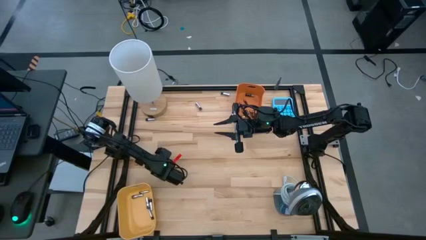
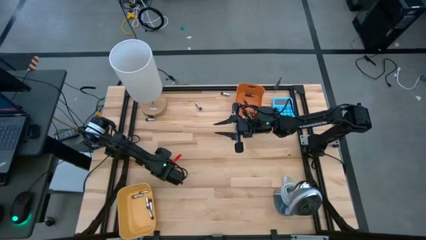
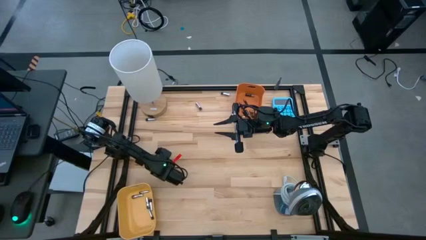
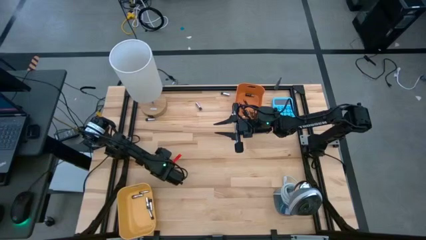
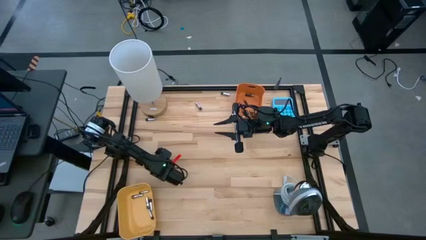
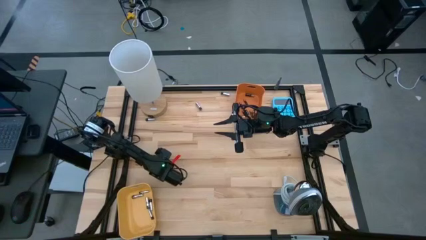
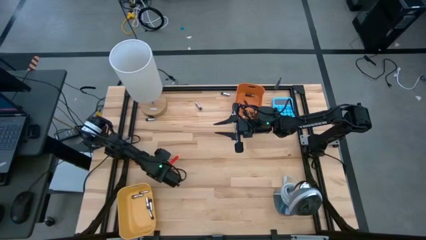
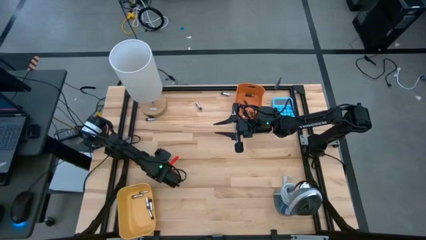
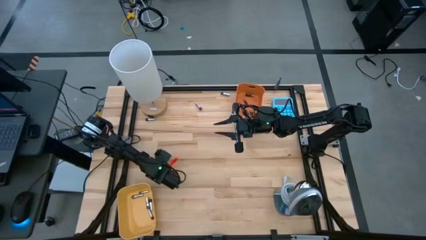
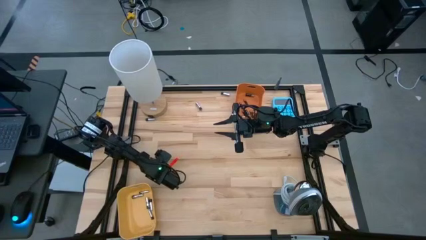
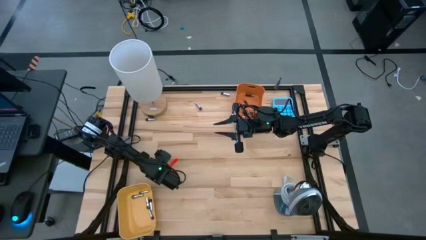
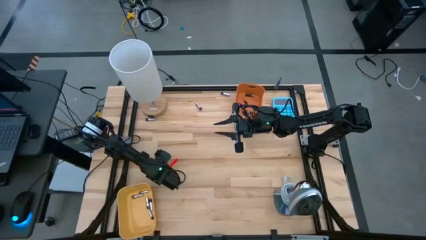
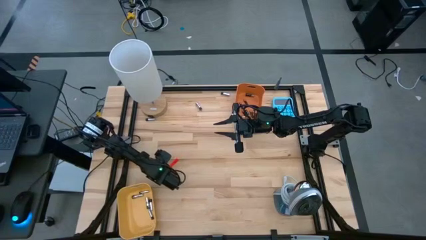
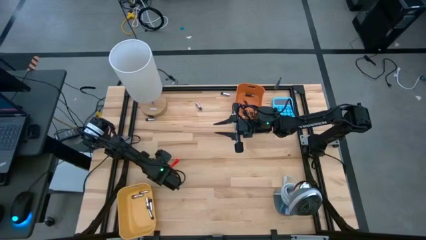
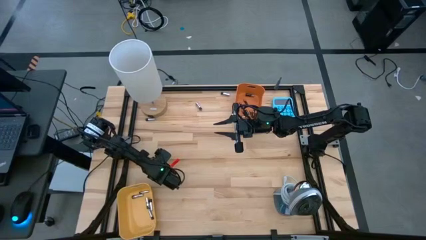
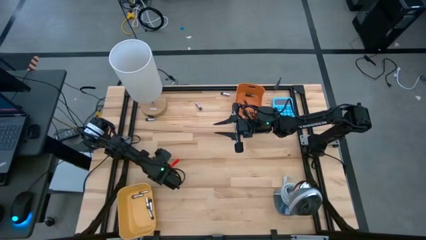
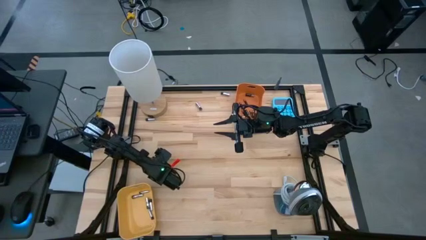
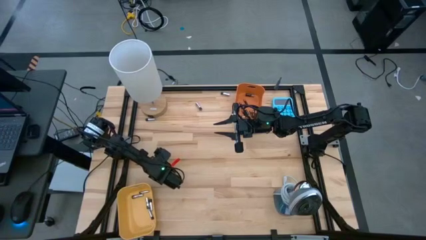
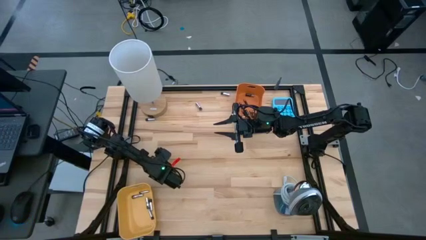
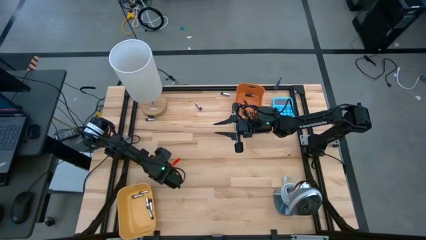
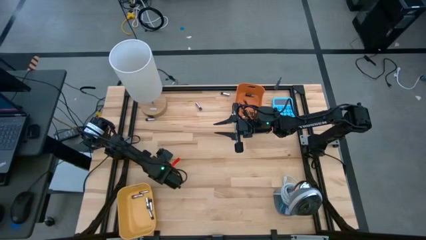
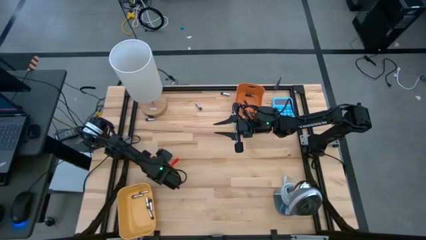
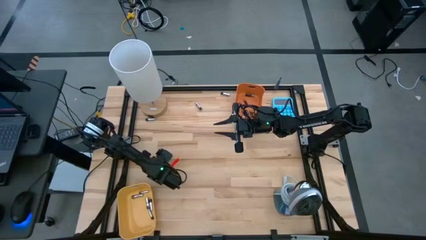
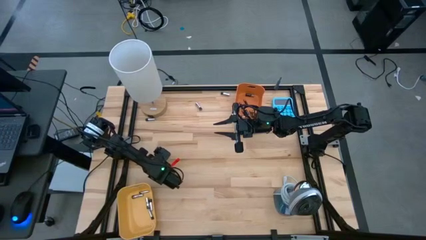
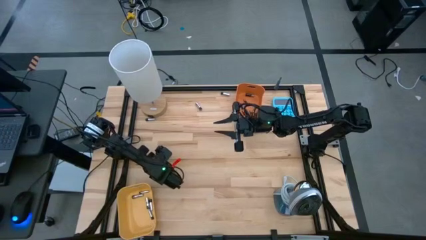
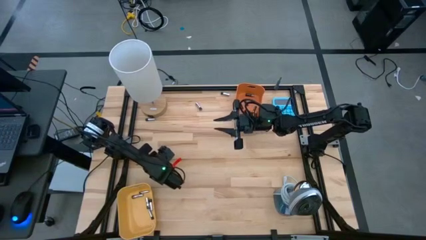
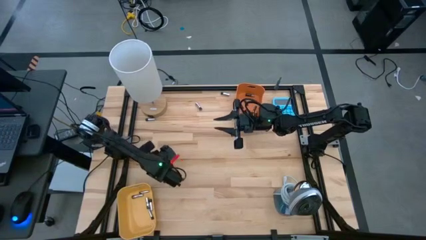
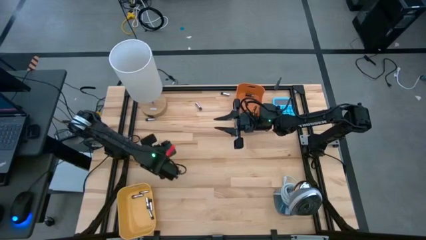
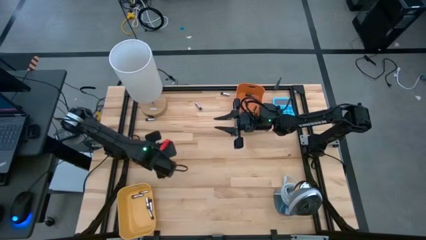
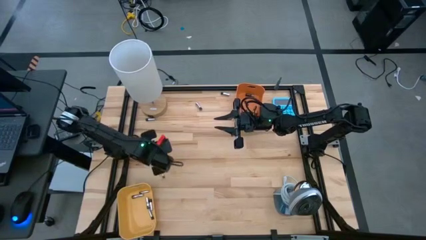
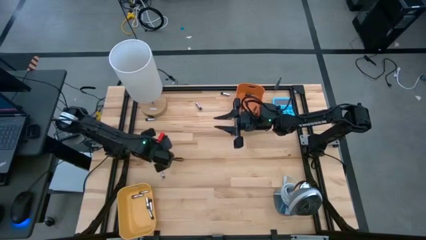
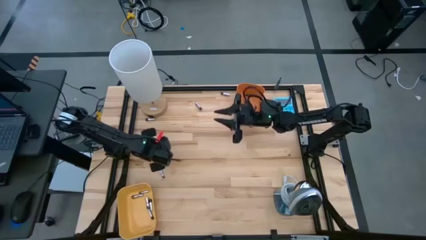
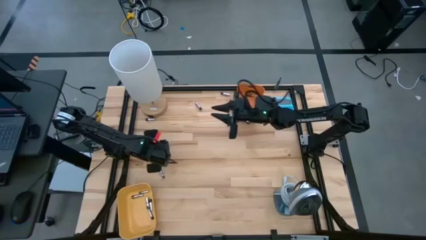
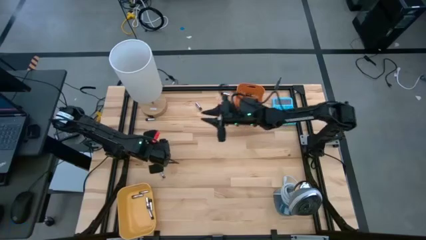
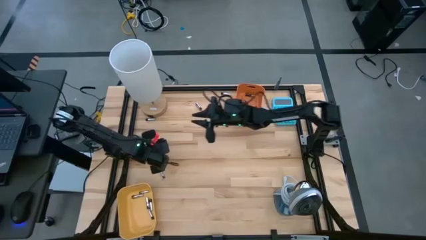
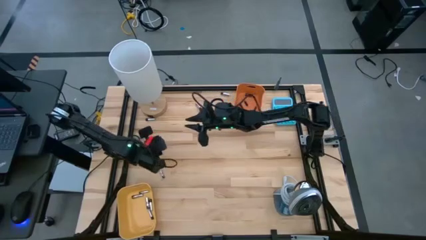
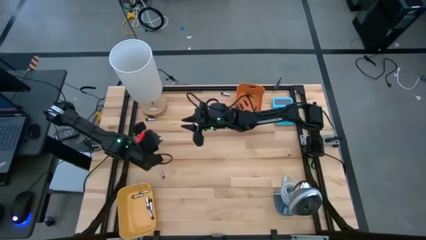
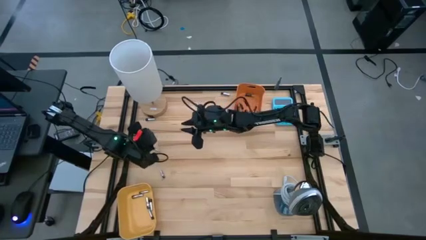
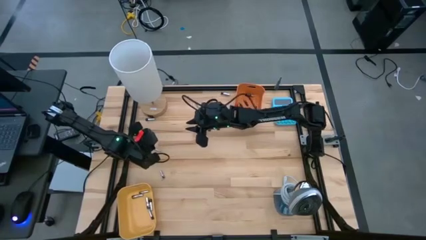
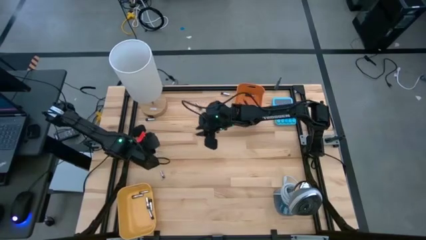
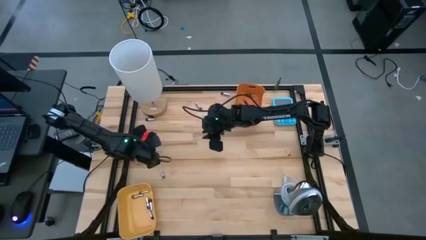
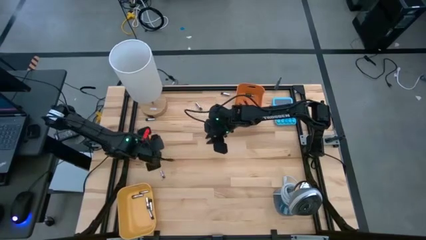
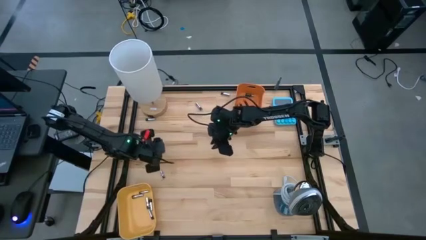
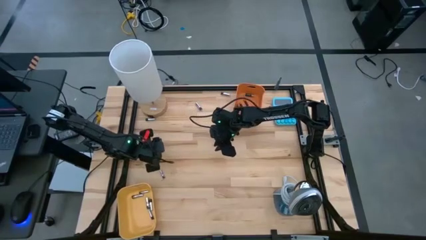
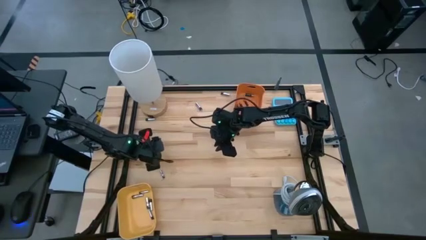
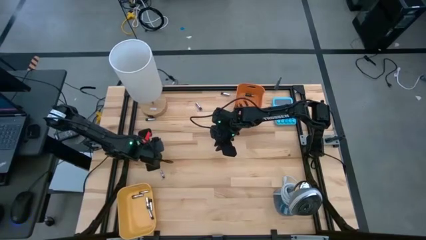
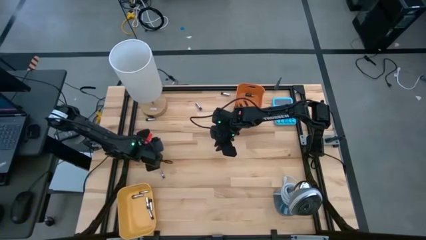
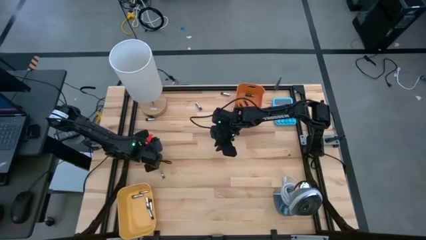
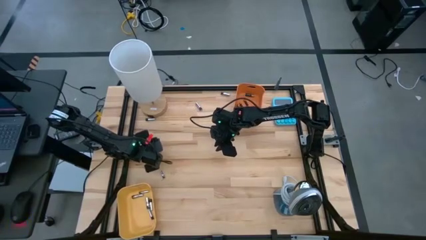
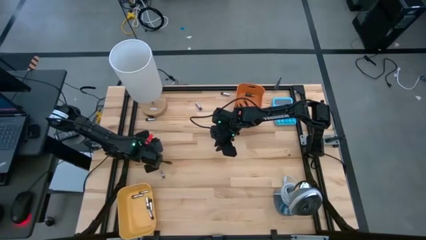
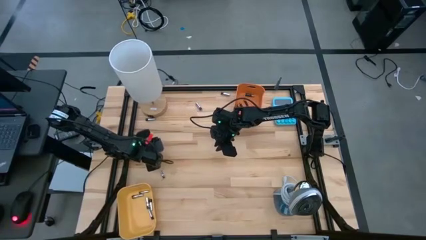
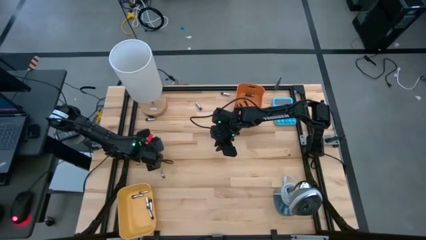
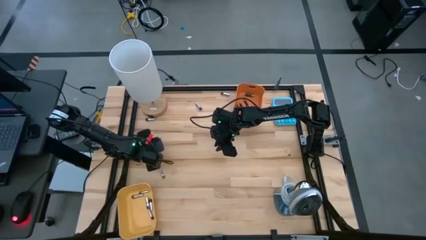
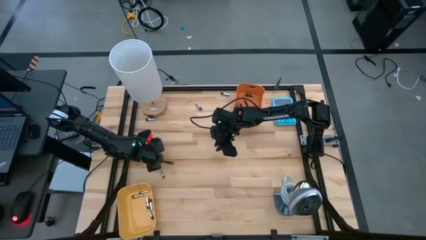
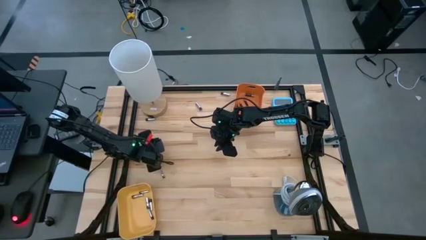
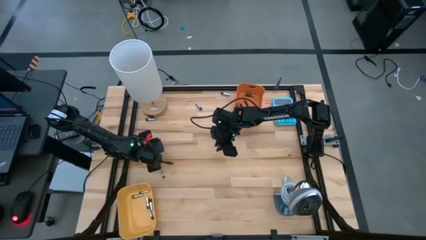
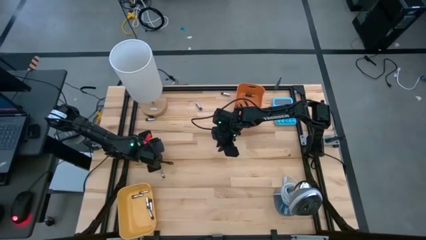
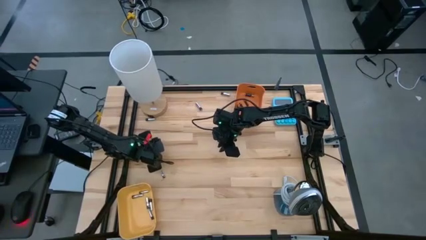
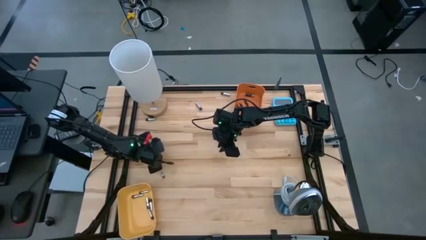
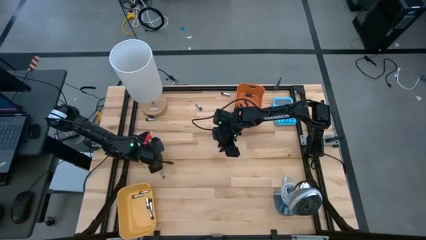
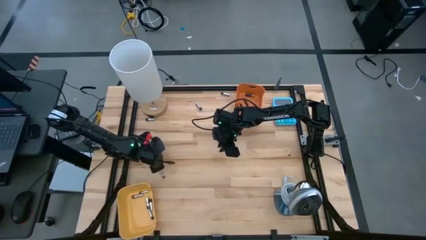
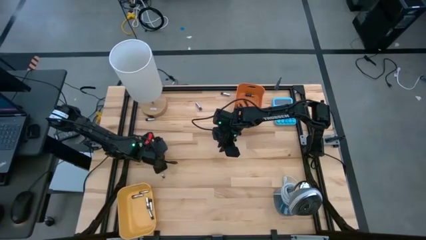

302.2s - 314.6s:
Task: Sort batteries
Put the silver battery into the yellow bin

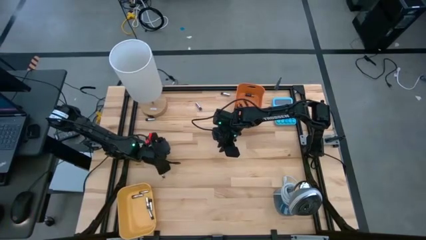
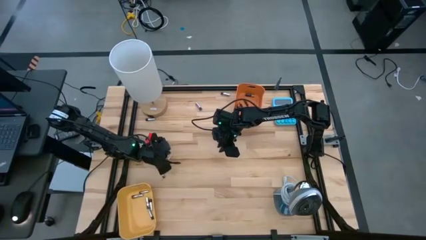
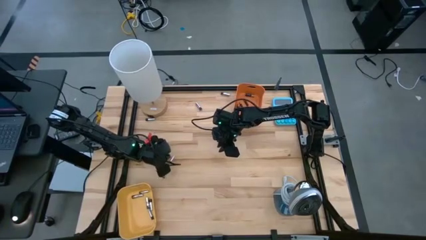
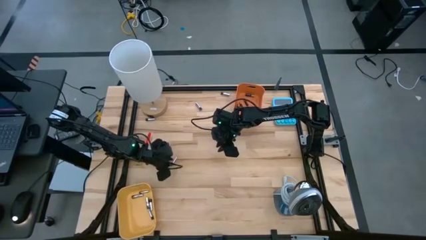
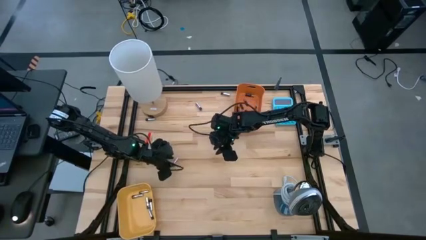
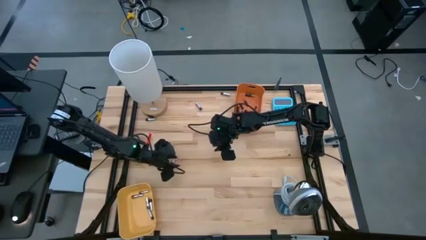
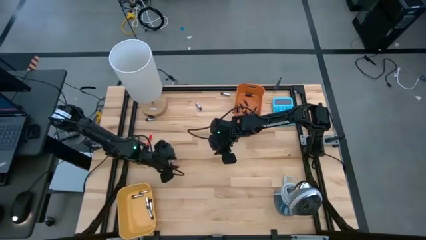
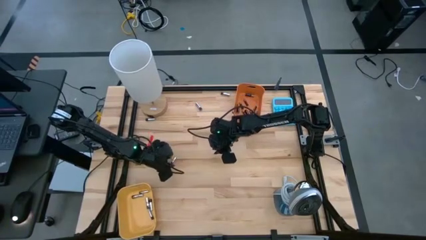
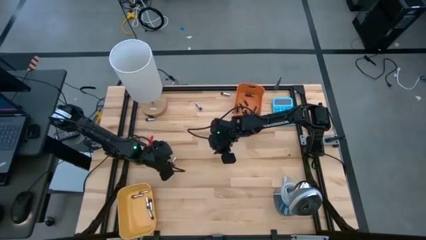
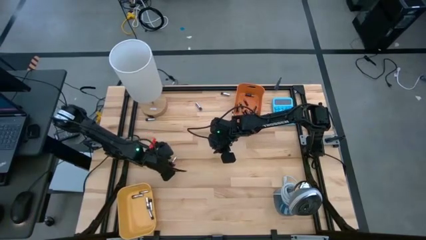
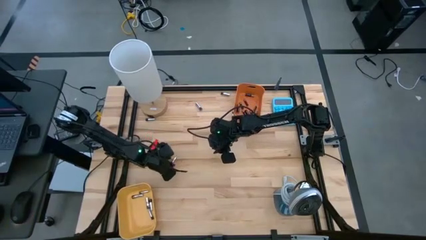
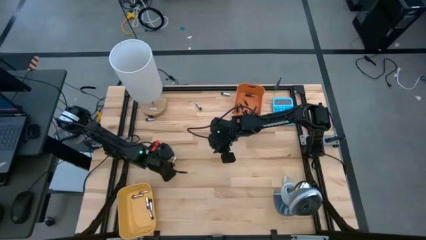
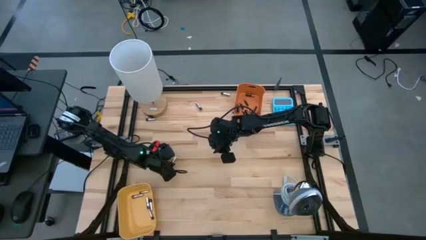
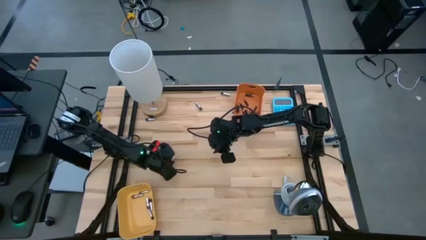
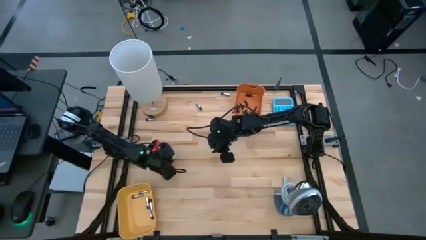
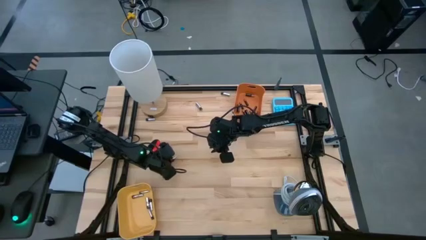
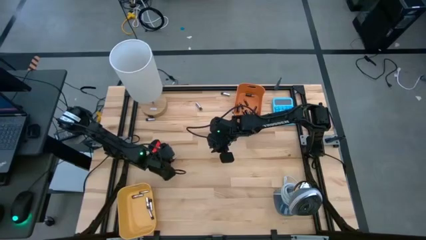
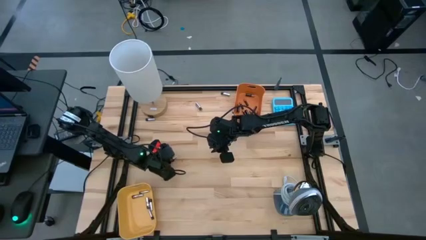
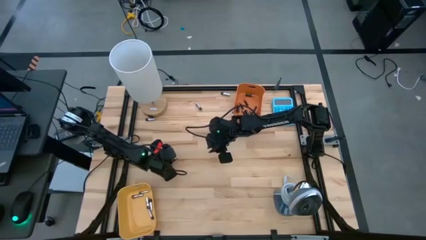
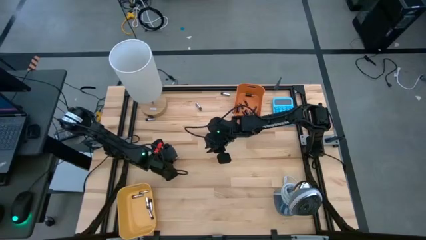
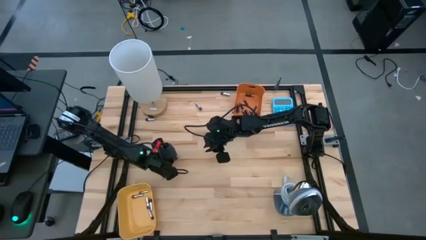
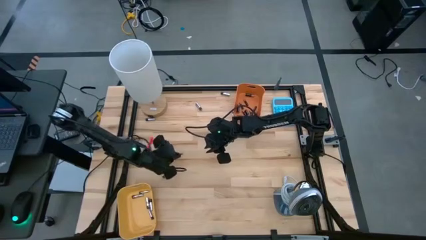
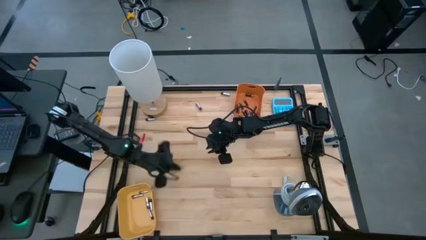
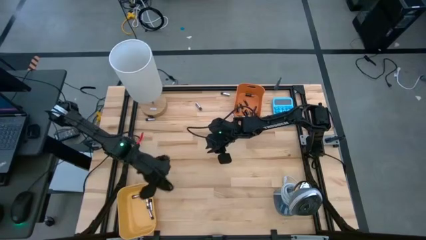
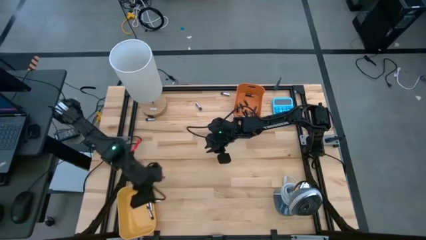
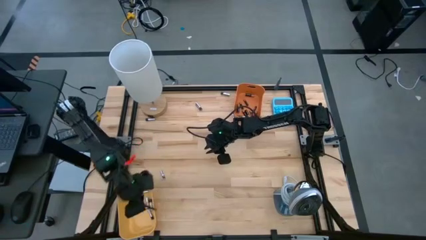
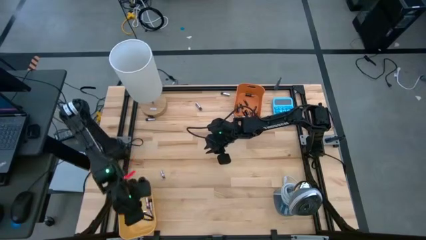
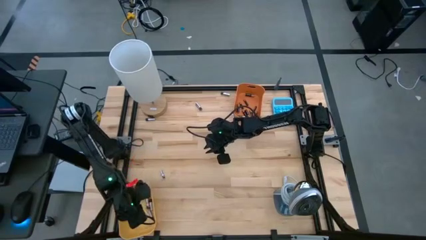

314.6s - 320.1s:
Put the silver battery into the yellow bin
